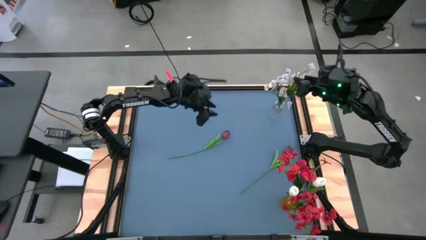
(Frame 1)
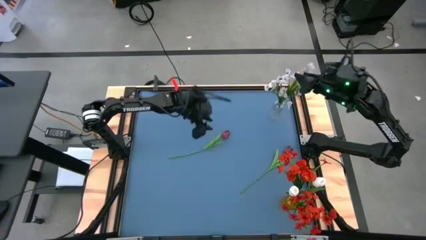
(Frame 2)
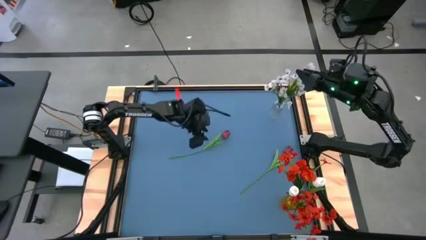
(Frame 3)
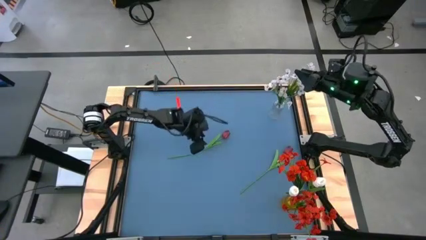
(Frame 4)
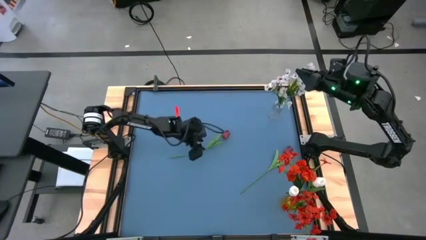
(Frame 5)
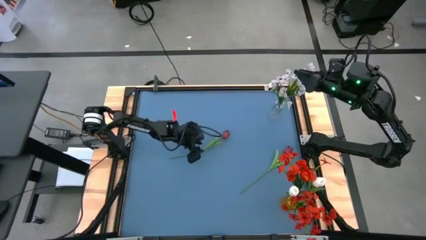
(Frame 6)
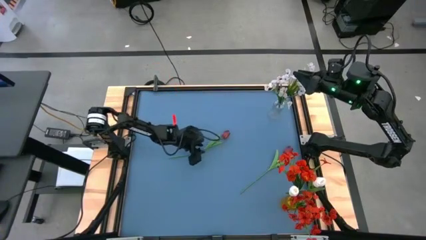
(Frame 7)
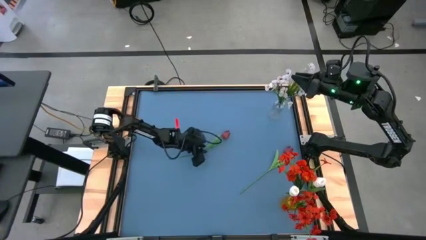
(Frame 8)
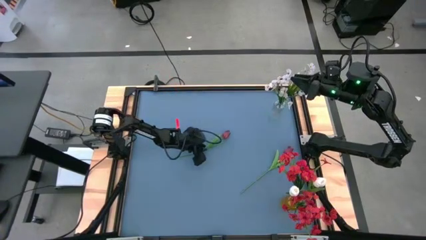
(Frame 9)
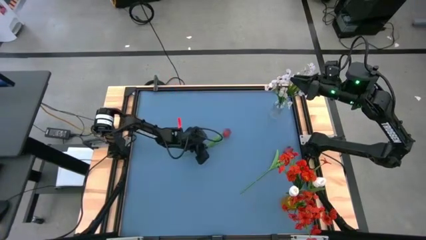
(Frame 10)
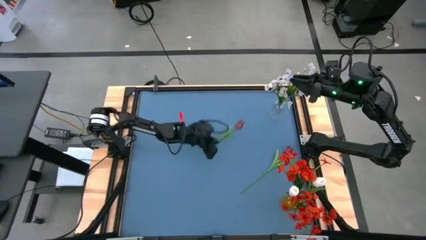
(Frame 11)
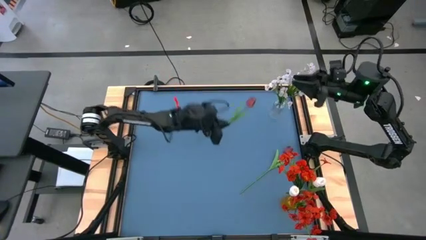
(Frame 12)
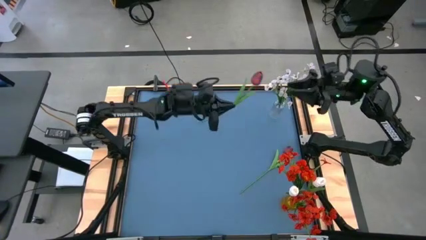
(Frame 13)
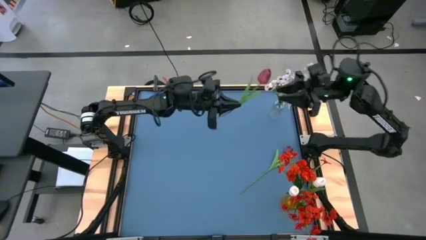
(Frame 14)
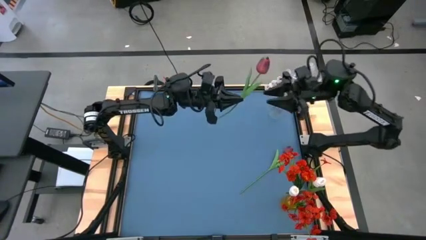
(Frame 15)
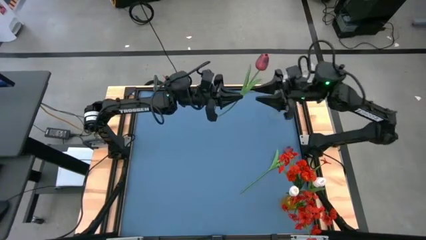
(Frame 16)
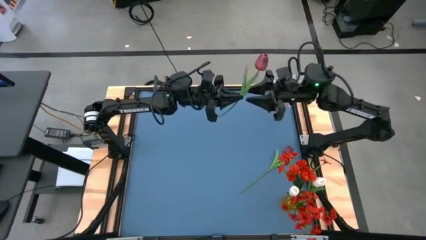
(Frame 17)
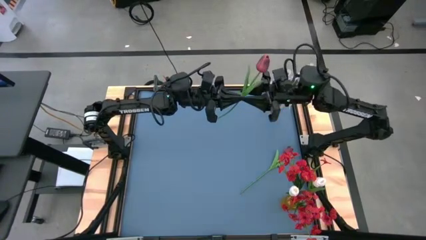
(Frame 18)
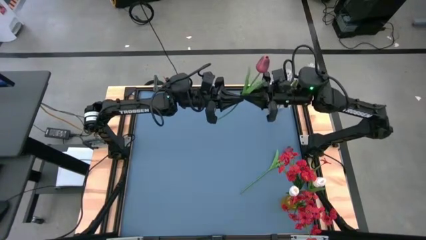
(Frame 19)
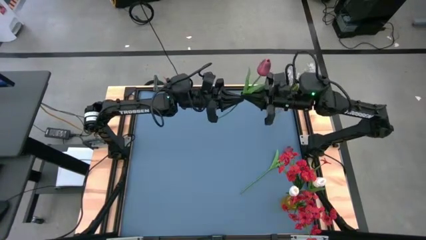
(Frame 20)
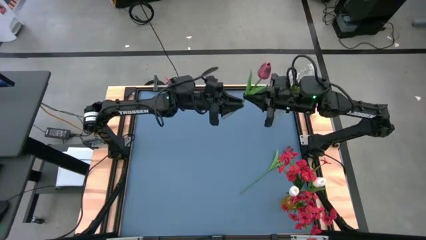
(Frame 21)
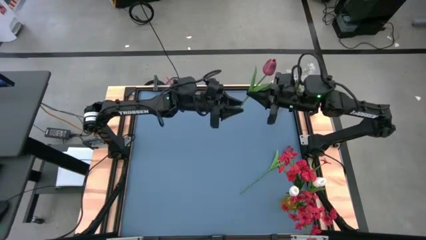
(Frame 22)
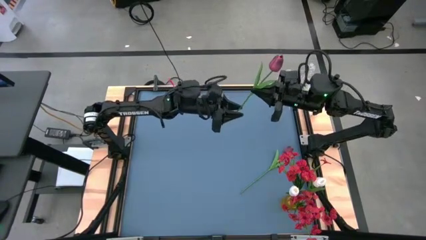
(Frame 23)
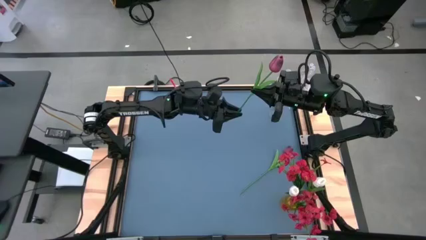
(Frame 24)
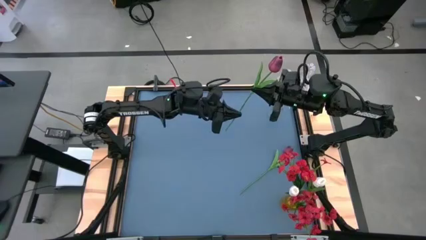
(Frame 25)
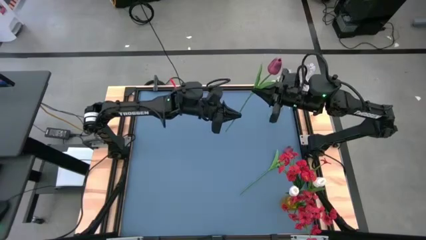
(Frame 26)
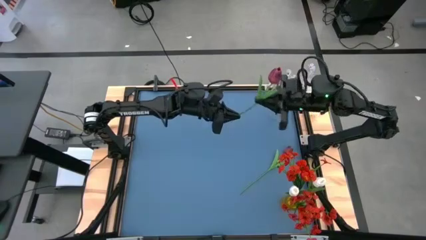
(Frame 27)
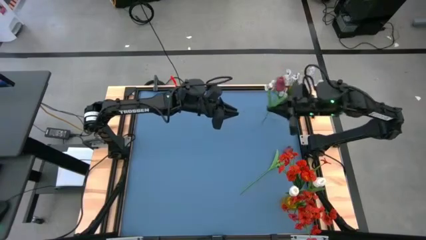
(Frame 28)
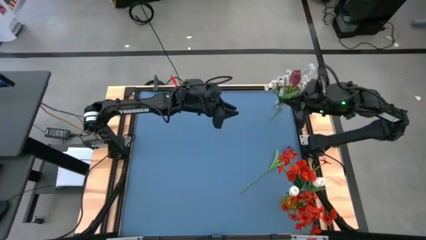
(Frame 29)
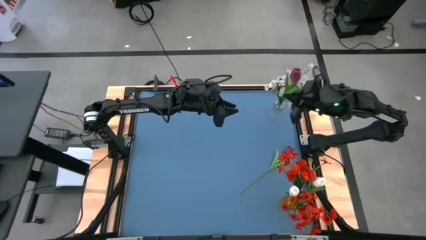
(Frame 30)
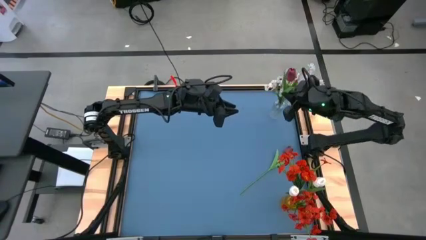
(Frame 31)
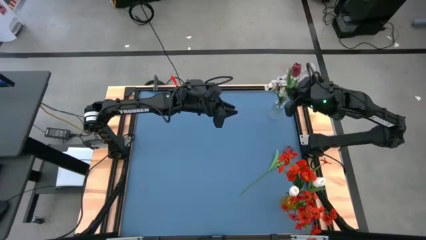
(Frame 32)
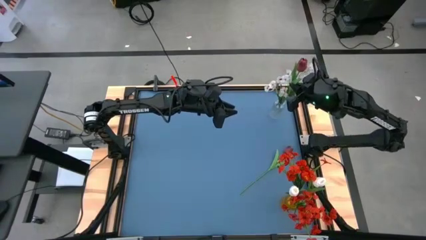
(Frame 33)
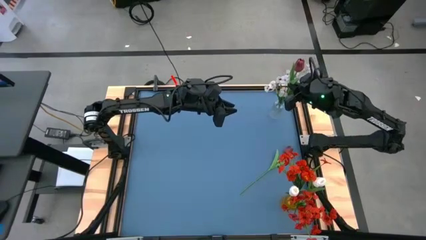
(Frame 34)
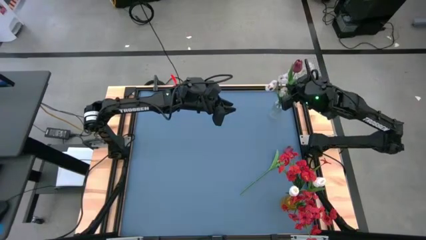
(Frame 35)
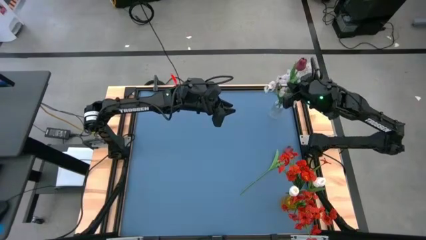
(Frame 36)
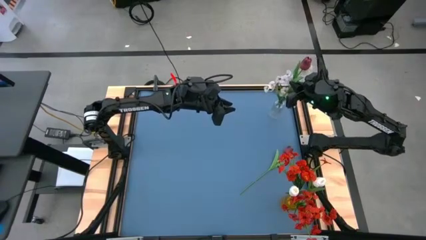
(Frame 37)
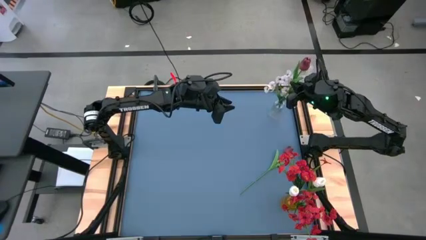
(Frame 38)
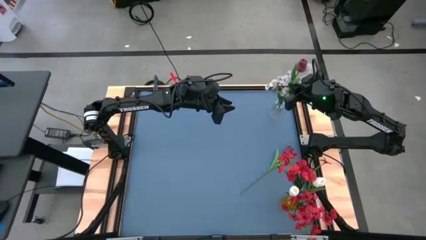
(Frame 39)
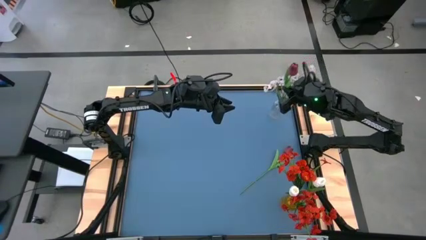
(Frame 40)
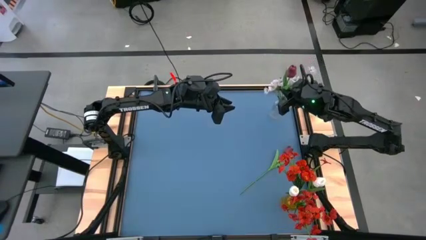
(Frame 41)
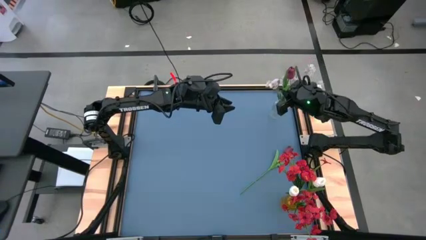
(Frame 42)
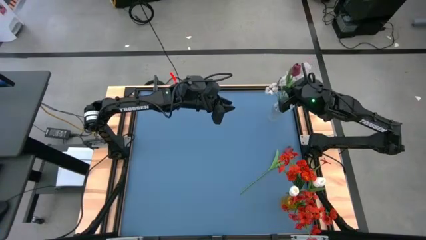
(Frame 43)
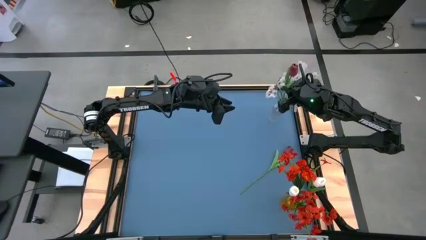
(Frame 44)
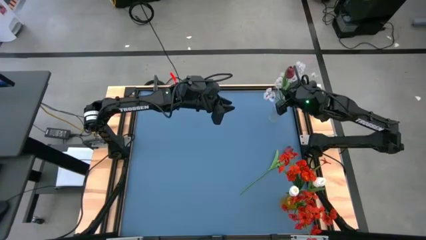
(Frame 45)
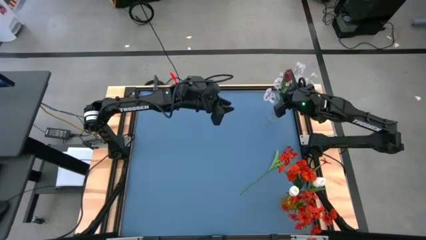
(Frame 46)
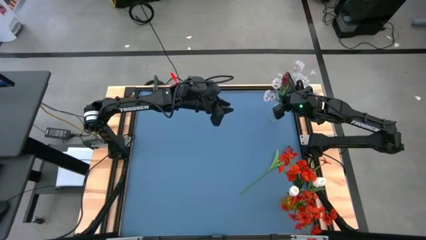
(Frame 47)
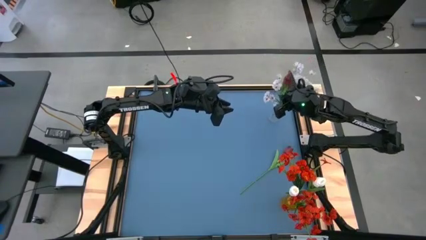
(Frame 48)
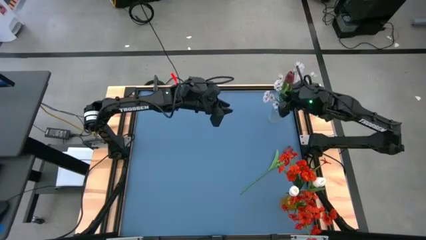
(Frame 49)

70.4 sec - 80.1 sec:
Task: Sort flowers into vase by color
Put the left dark red flower into the transparent vase

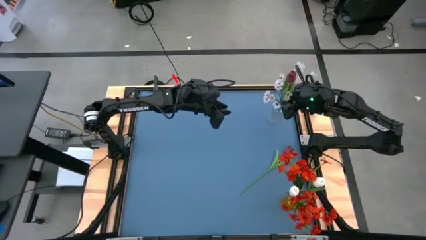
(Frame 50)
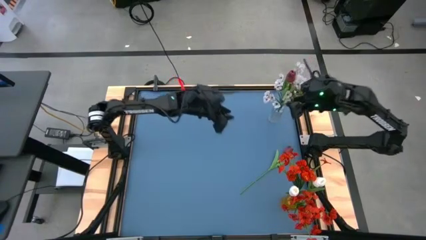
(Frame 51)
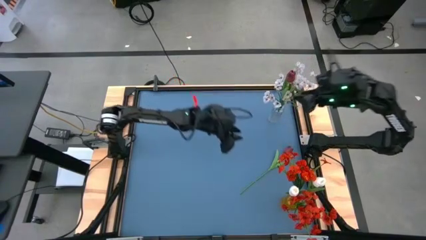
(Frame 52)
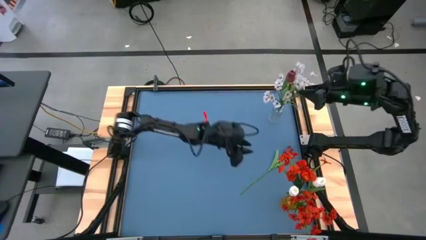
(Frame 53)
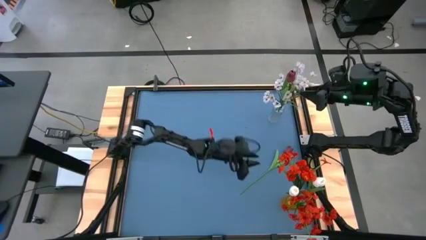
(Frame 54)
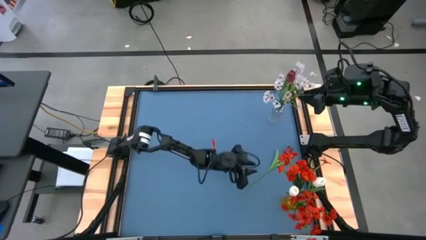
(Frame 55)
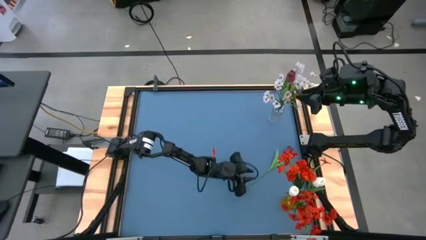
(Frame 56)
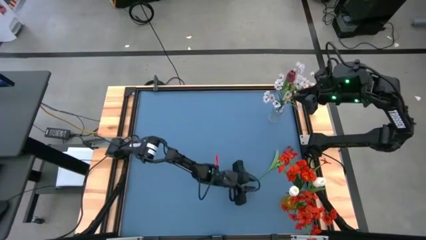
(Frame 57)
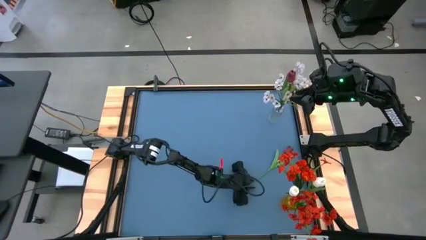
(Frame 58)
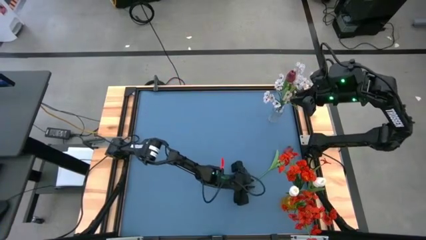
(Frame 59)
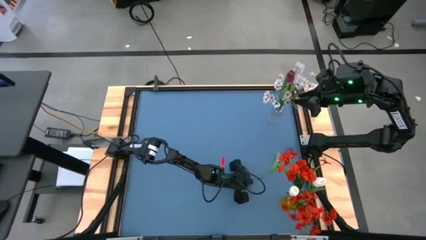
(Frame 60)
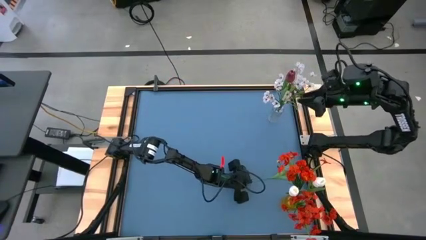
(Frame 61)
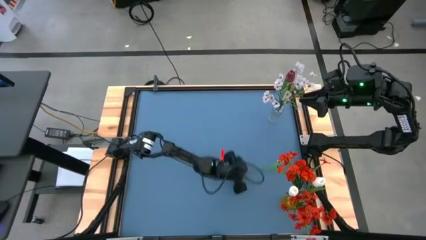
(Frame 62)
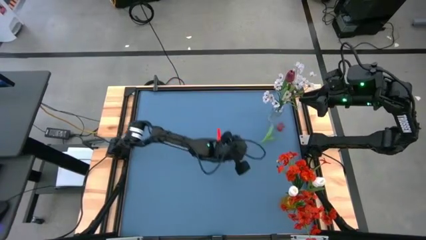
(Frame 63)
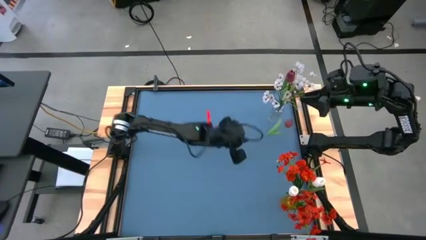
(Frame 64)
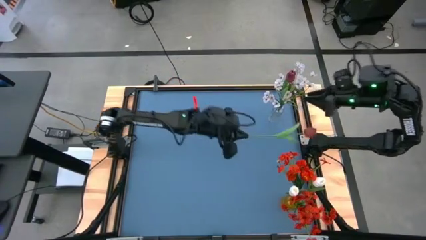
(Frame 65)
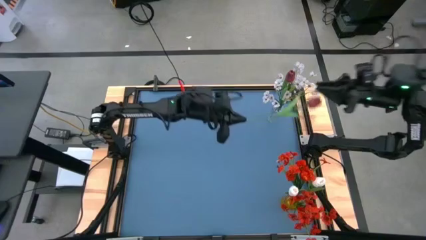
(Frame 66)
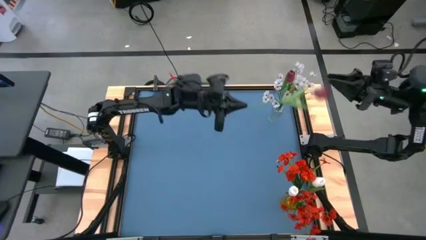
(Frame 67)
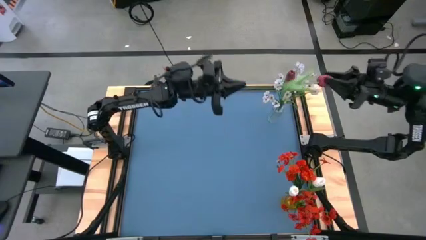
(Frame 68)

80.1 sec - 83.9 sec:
Put the dark red flower into the transparent vase

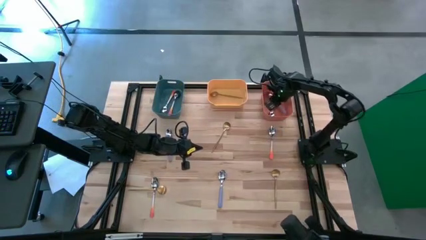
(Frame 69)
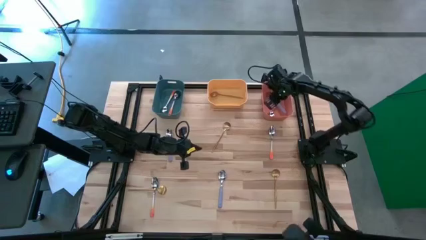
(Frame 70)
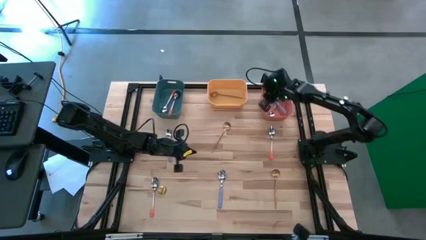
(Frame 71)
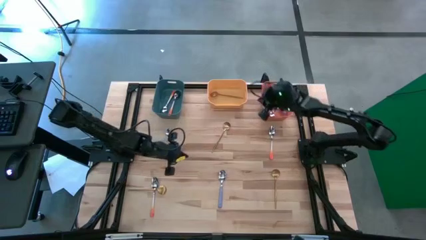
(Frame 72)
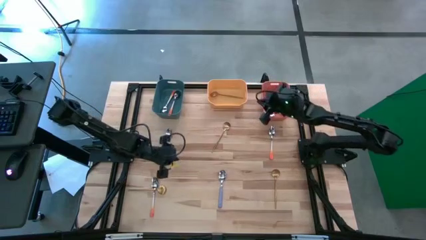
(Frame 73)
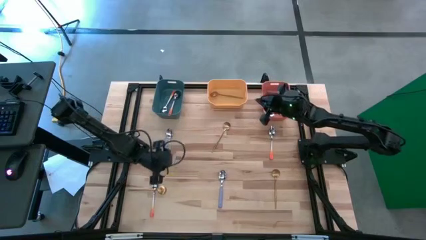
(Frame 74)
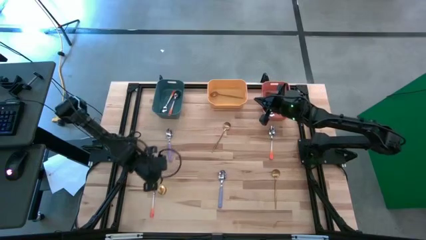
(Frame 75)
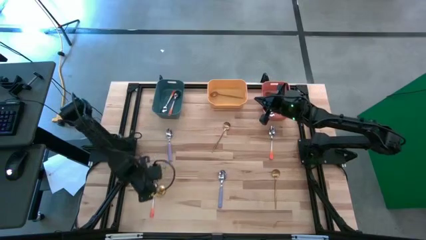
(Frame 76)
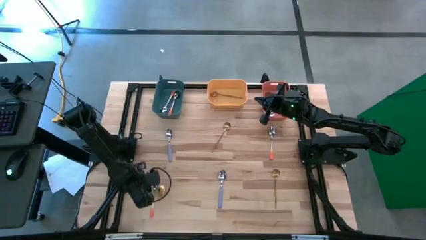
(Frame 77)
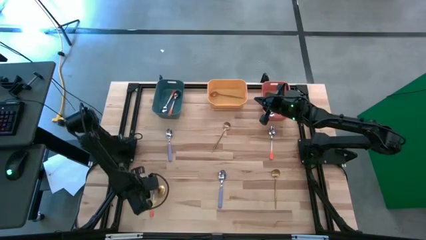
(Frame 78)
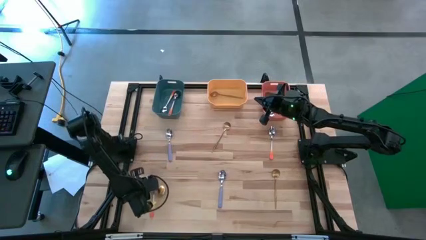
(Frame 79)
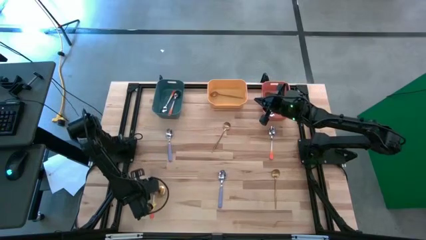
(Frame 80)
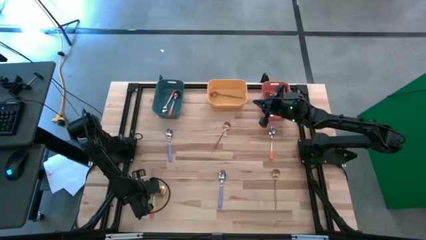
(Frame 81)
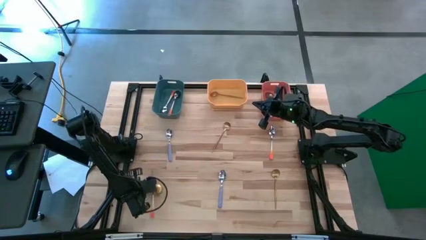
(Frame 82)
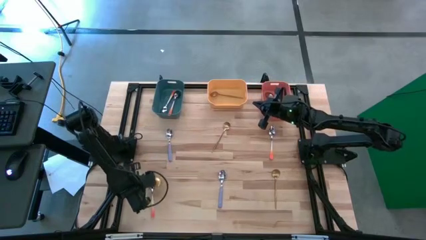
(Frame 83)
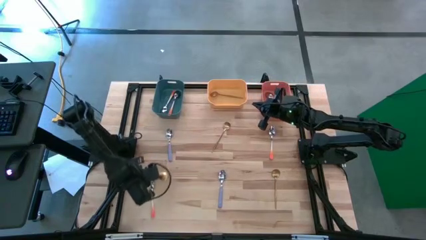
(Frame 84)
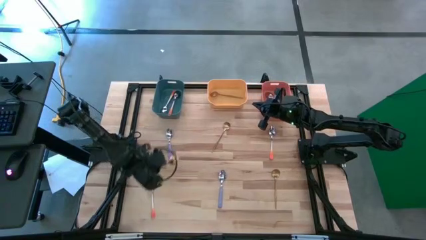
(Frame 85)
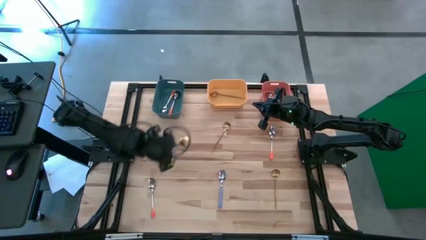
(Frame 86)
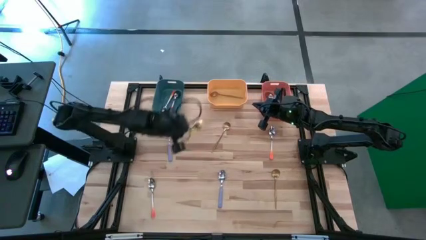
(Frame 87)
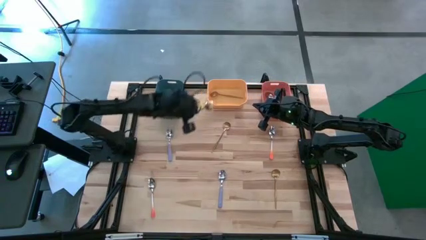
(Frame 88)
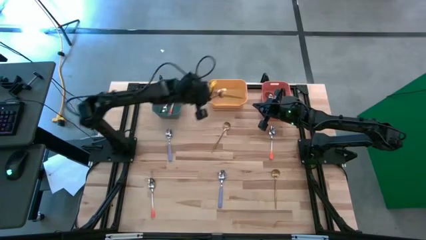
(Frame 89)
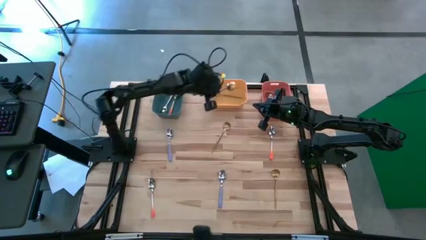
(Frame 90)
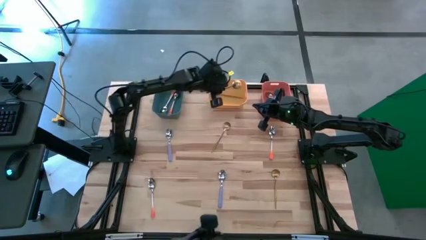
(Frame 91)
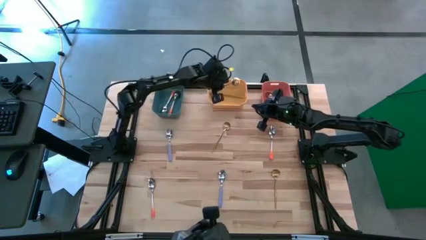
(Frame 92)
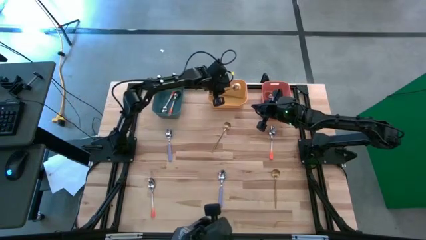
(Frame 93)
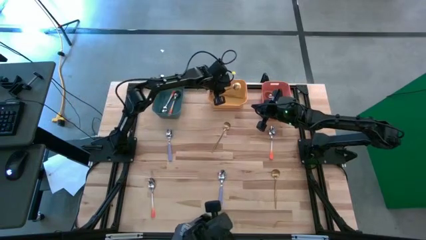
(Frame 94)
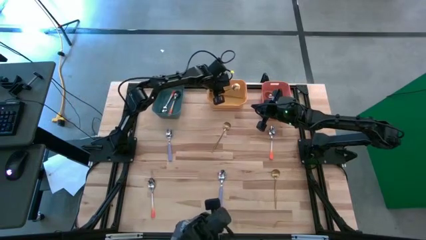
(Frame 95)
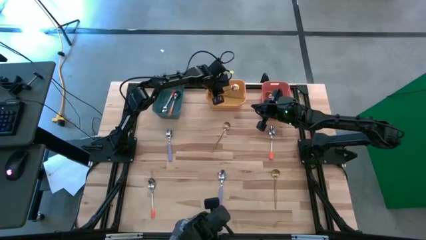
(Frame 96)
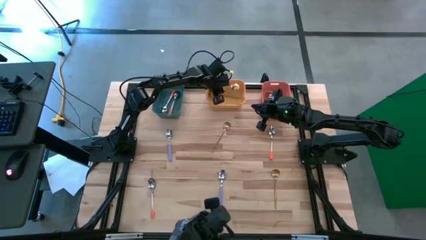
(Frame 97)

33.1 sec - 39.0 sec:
Task: Sort silverware by color (type)
Put the left gold spoon into the yellow bin
